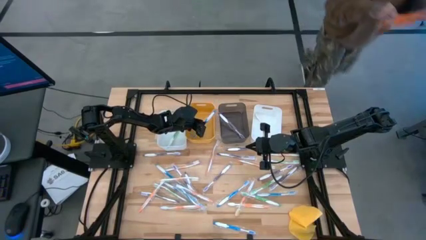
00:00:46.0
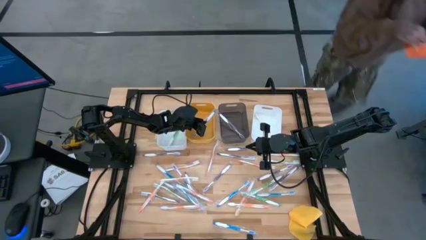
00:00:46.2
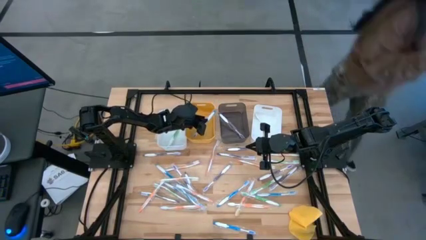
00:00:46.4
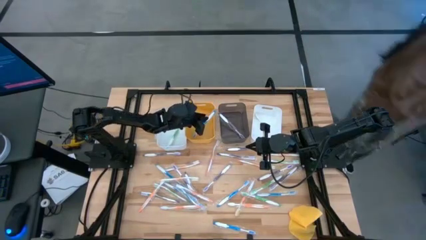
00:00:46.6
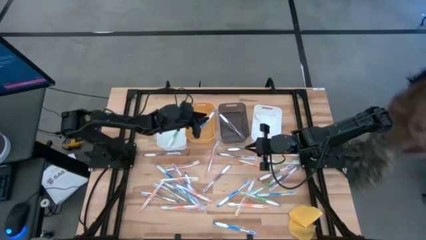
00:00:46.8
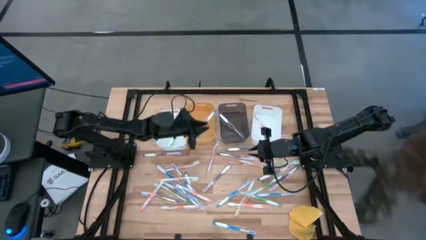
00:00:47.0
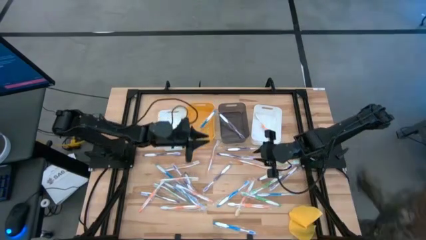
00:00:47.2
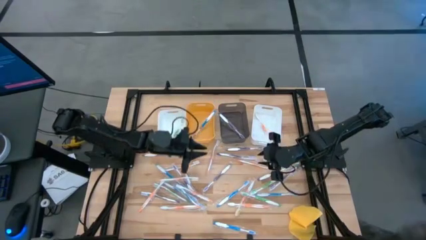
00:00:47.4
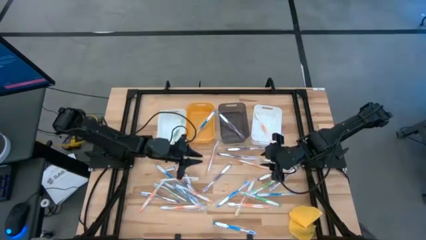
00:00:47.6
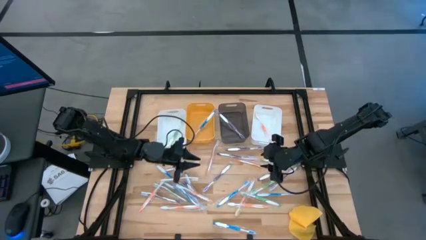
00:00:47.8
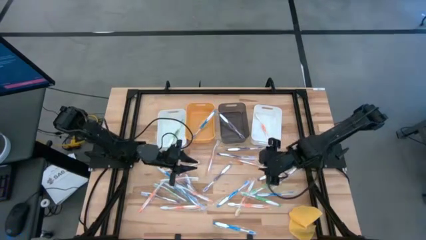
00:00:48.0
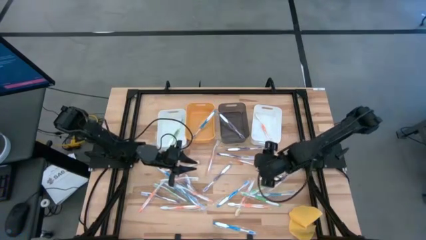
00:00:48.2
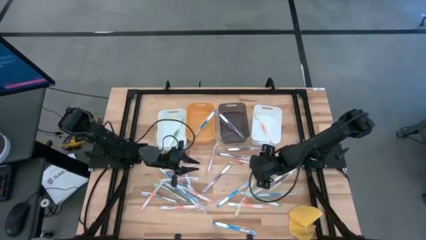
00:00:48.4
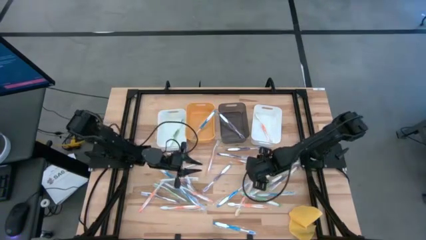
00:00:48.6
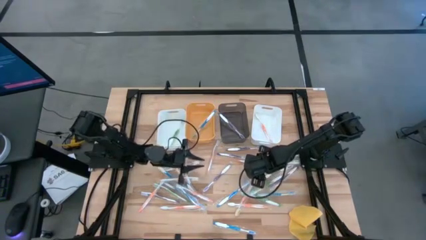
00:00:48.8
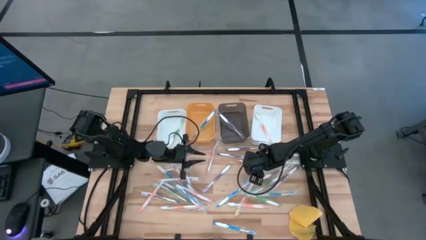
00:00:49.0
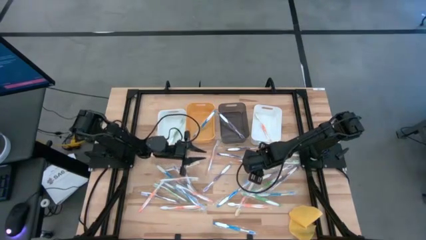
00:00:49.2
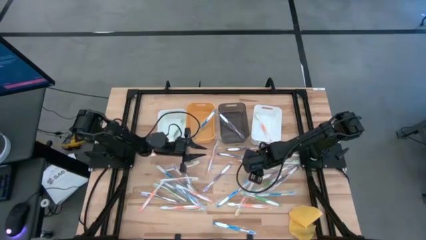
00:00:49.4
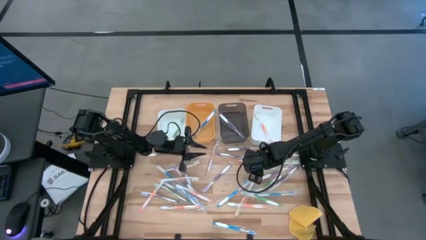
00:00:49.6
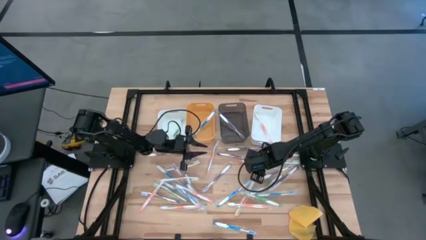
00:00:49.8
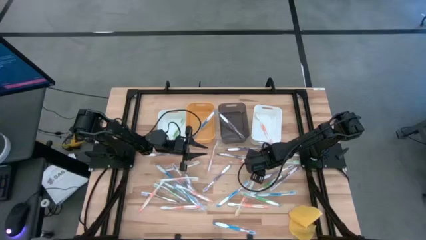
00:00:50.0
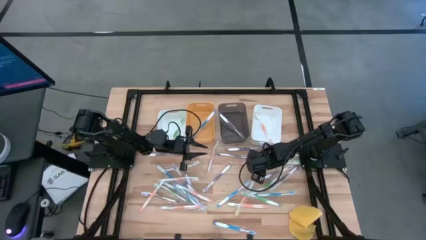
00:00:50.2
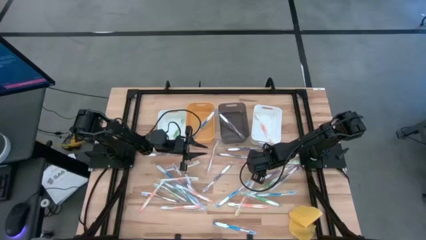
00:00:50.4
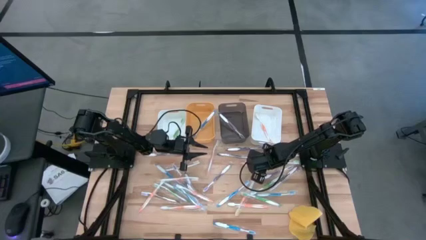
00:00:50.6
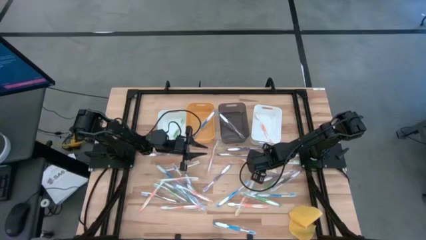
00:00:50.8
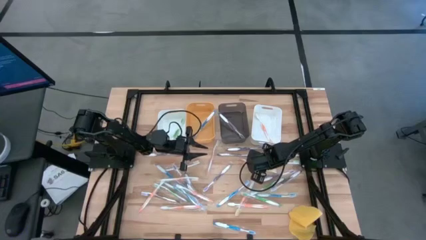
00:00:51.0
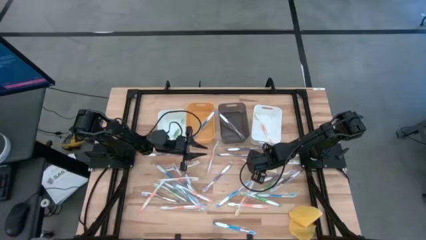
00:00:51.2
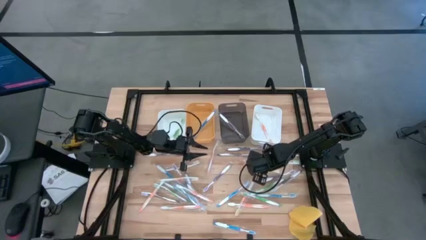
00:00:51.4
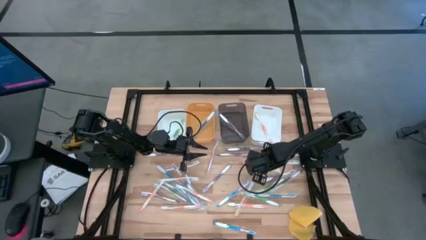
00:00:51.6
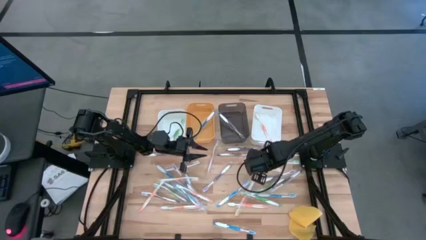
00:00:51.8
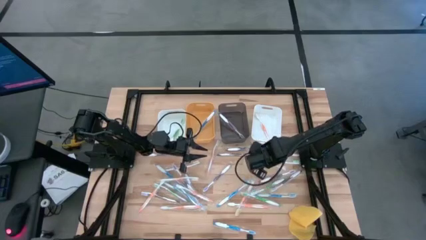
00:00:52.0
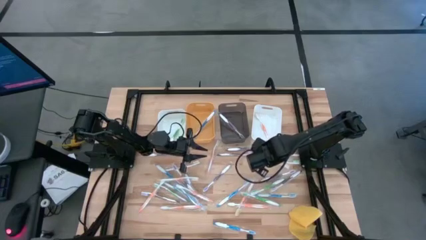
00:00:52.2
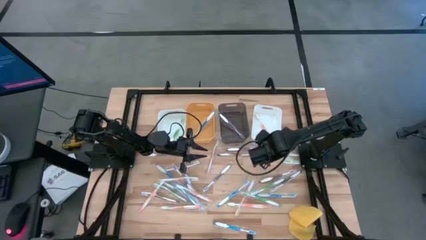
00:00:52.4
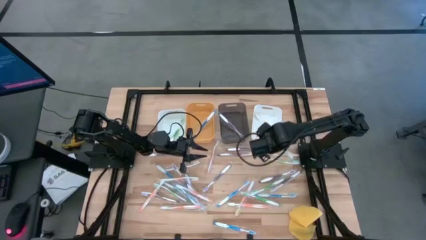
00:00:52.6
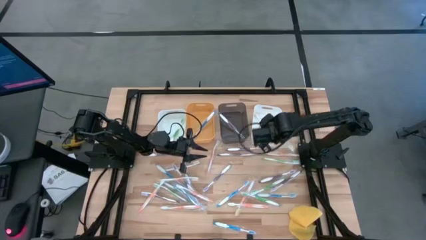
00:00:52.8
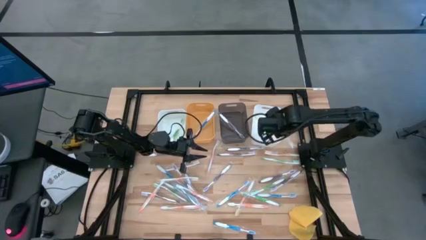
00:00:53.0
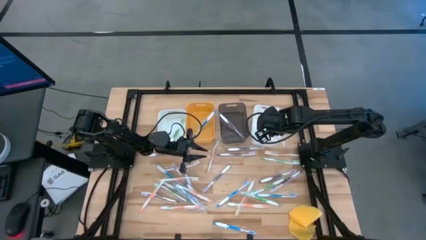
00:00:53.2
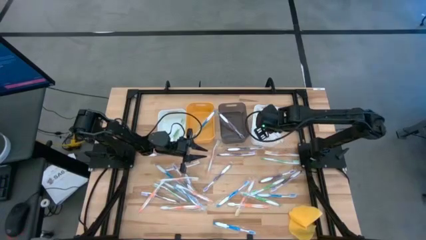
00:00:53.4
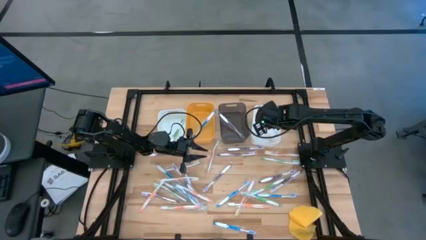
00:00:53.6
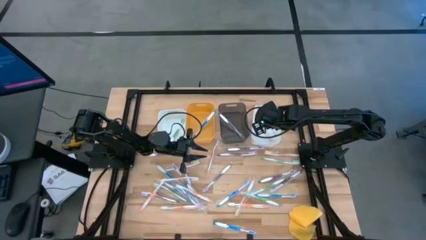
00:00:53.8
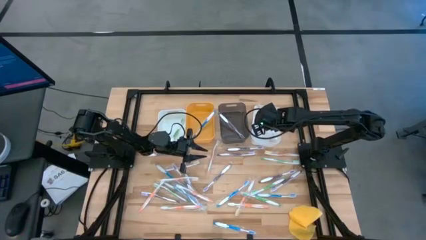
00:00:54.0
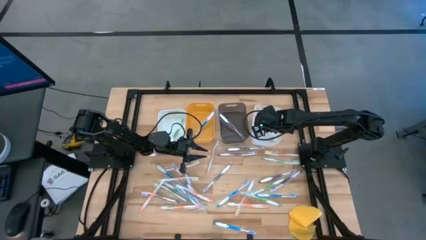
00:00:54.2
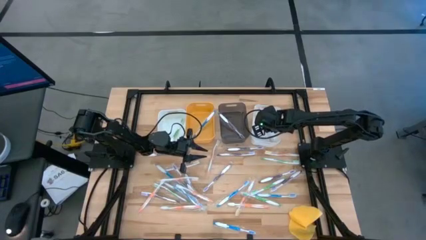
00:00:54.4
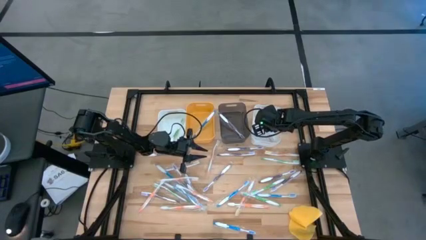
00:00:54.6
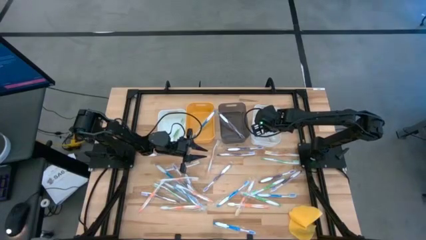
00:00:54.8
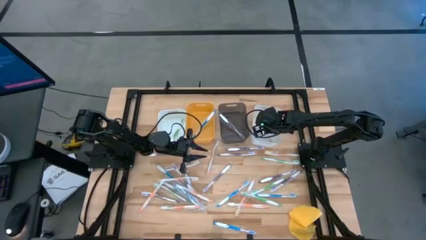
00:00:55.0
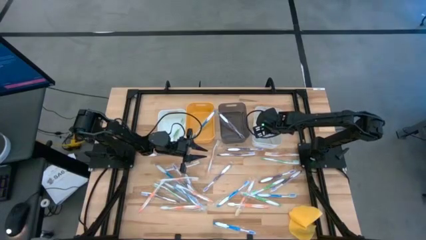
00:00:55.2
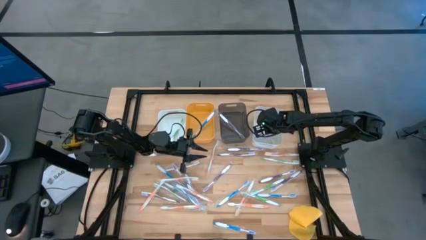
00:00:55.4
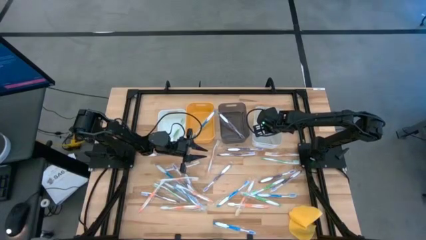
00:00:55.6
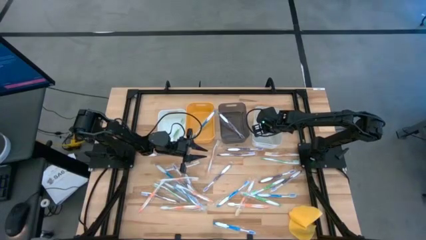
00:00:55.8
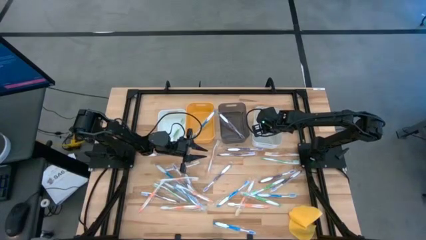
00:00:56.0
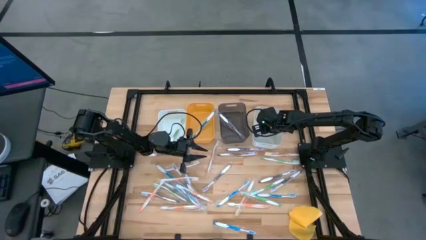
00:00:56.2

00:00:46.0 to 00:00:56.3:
Task: Pick & Place Toothbrushes
Put the orange toothbrush into the right white bin

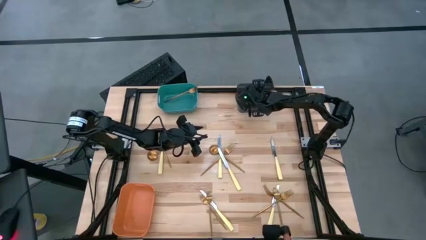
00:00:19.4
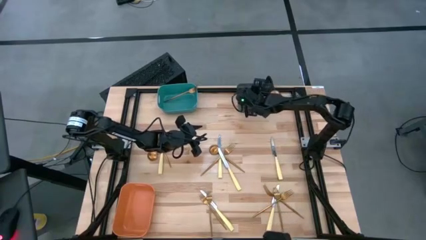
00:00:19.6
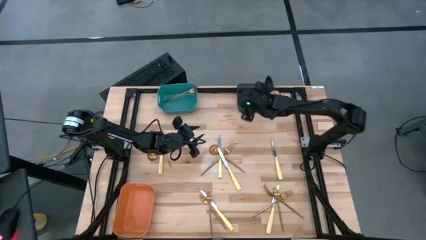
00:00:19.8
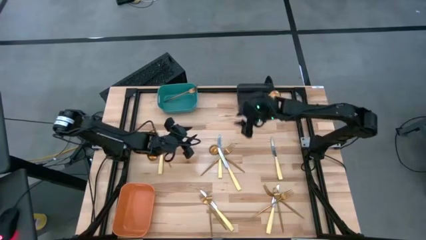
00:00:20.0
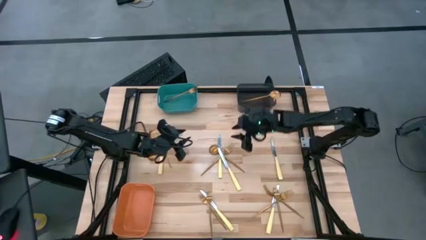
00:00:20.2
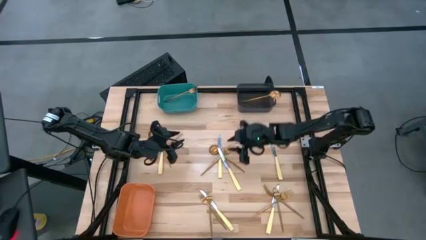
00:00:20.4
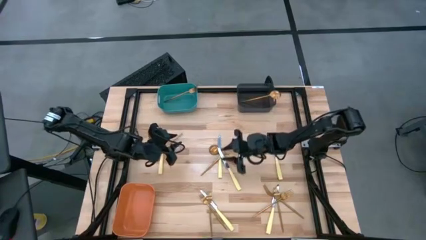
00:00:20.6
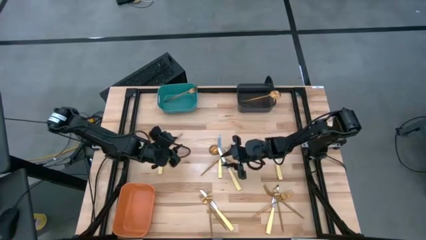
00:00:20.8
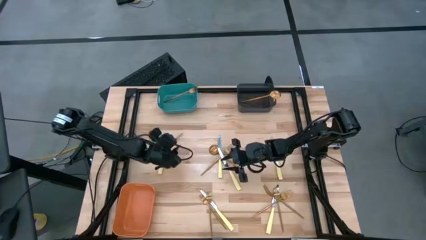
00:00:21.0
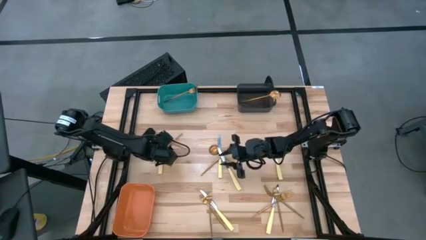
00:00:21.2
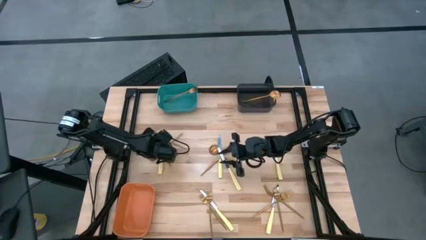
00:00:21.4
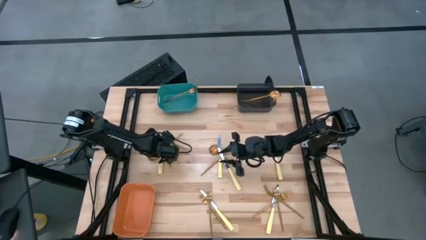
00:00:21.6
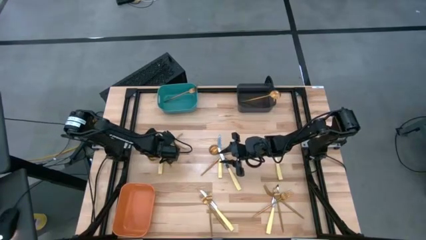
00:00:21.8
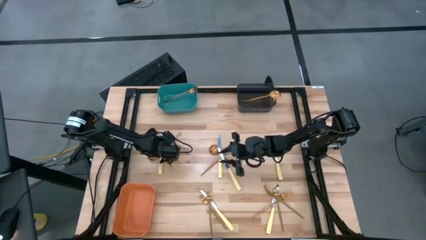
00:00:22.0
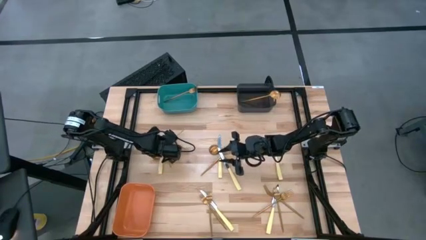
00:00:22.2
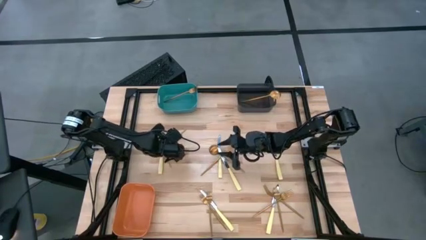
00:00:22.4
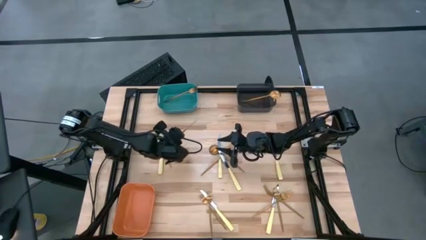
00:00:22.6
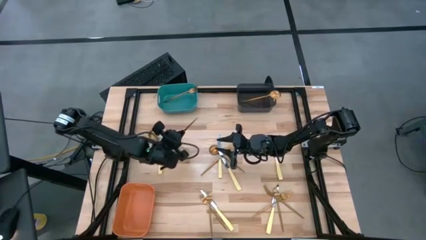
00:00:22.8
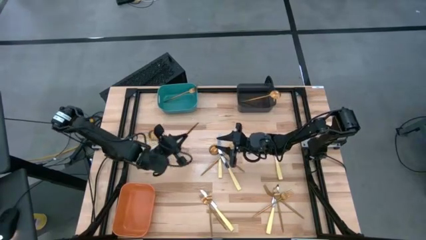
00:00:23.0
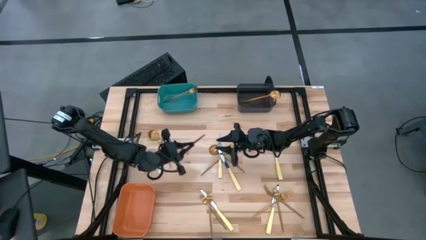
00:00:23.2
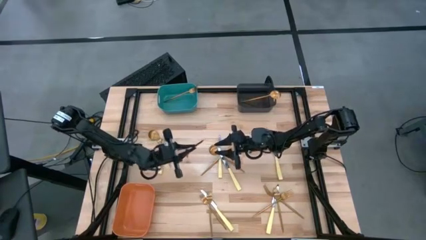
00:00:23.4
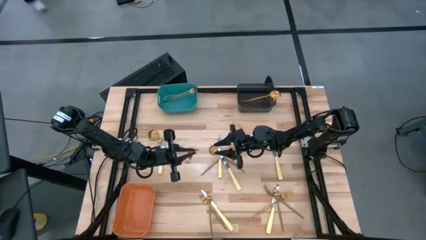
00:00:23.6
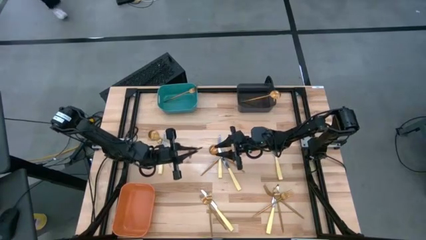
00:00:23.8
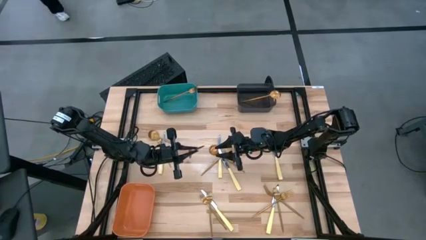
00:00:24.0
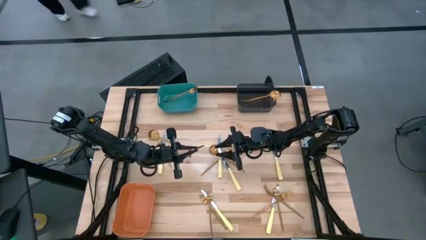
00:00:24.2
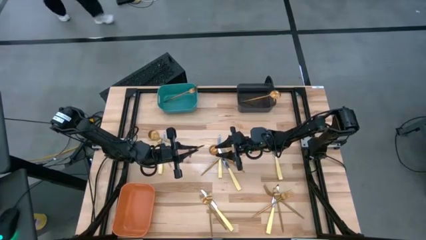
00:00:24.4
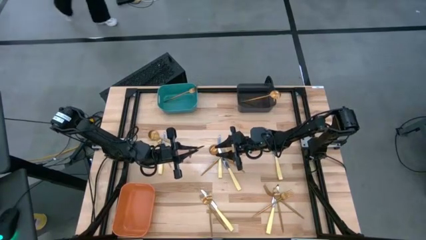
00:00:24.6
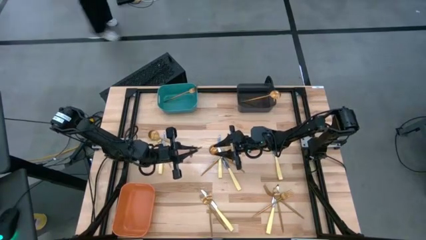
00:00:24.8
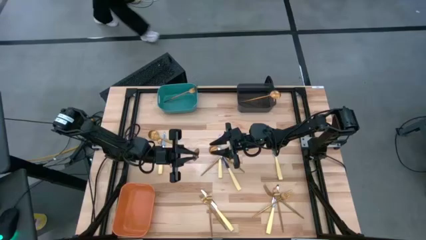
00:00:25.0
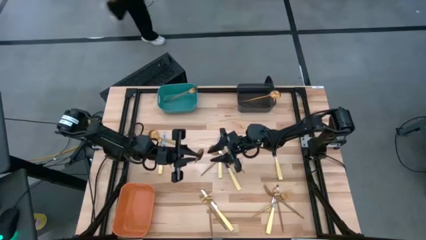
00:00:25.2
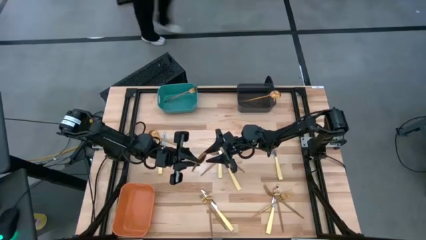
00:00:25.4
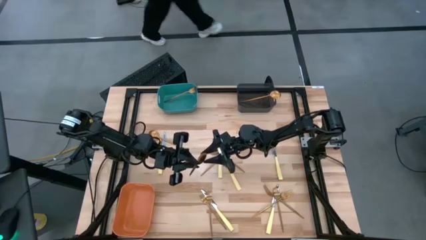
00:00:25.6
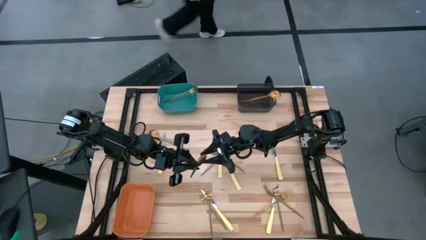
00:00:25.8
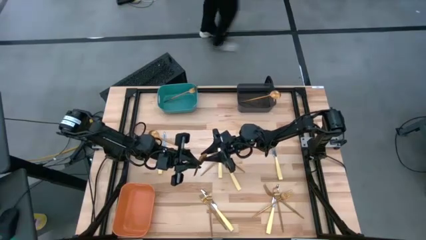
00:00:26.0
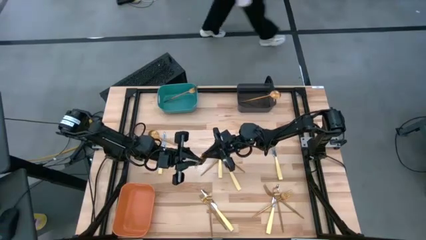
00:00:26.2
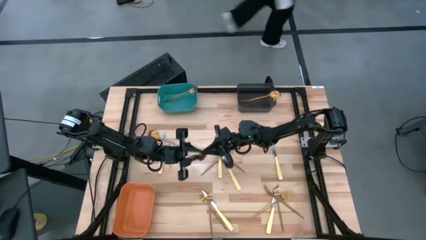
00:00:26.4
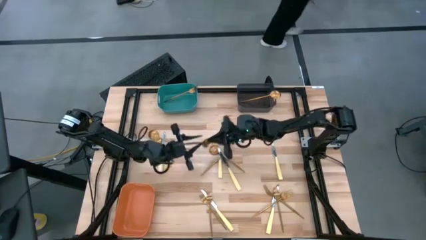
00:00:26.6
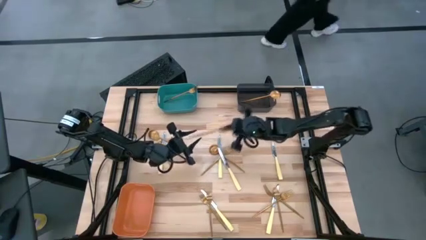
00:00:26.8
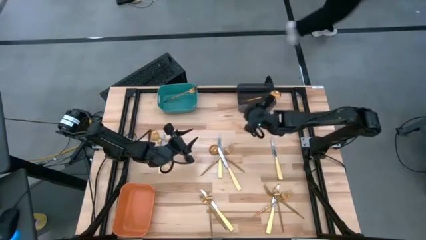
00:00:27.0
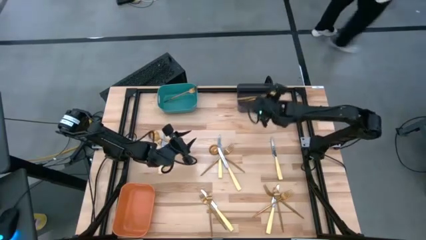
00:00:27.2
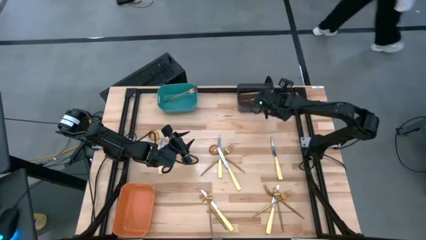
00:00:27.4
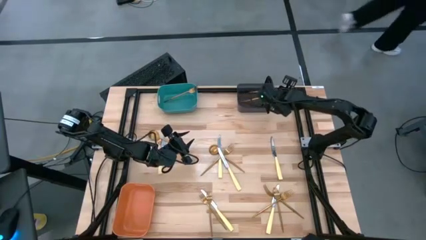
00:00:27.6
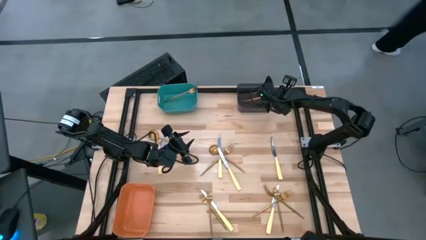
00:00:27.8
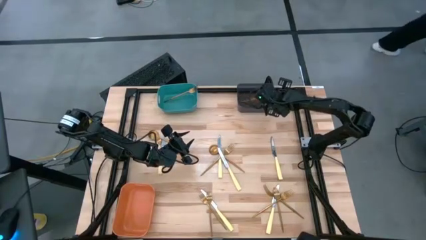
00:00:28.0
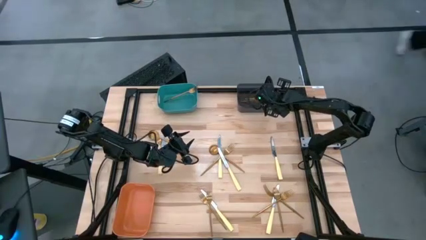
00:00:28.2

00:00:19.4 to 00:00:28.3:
Task: Sort silverware by color (type)
Put the gold spoon into the black bin
